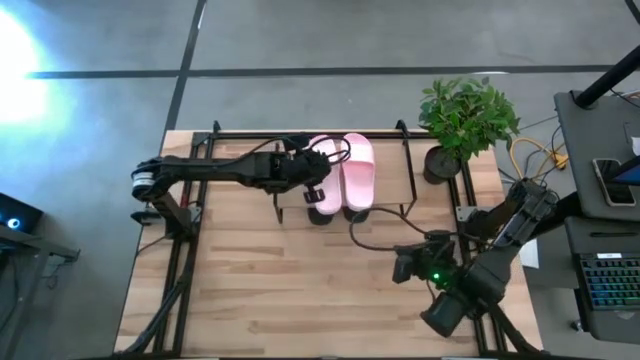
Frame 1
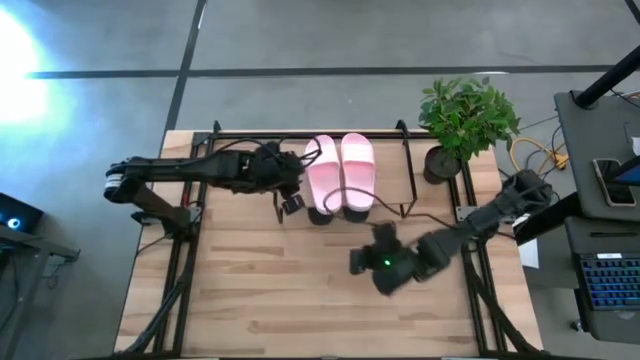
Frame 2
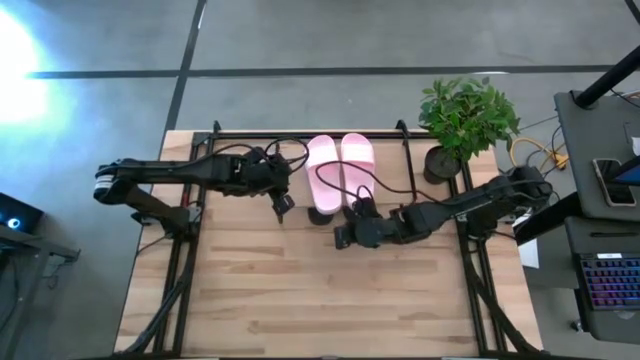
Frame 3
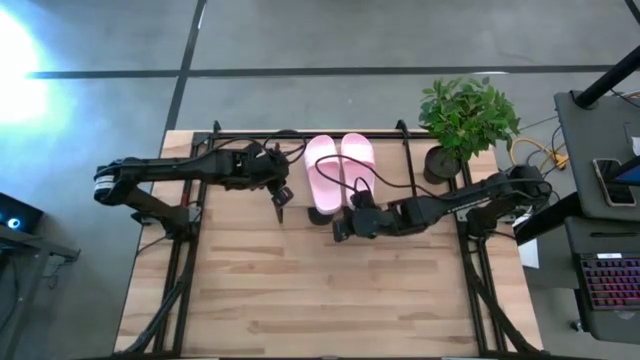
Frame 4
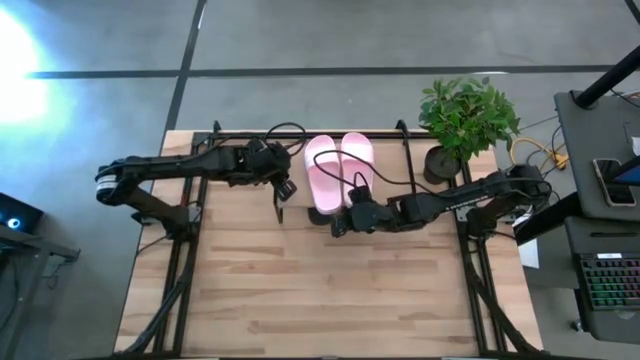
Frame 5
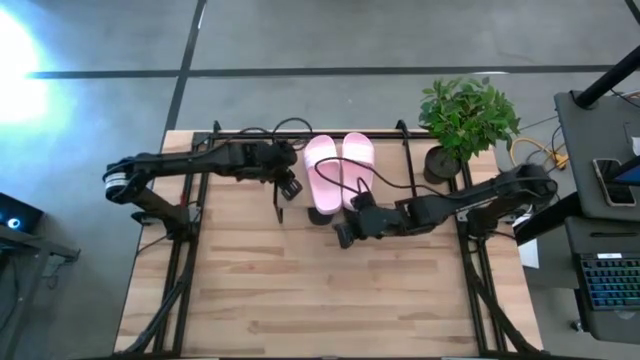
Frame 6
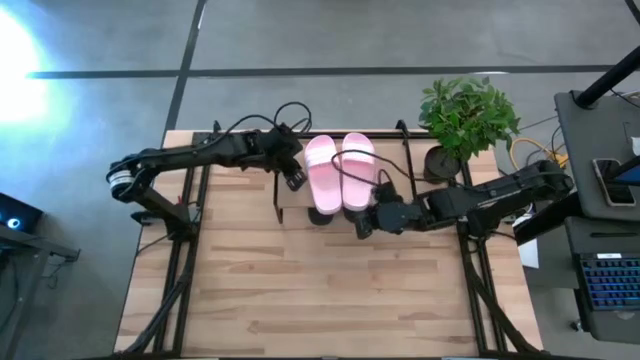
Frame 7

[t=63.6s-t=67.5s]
Task: Pick and place slides into the shelf
Adjust the pink slides on the shelf

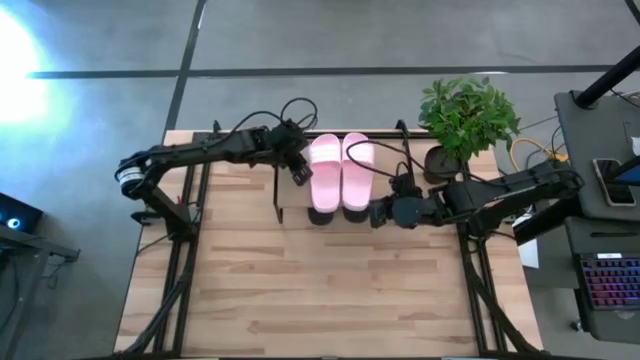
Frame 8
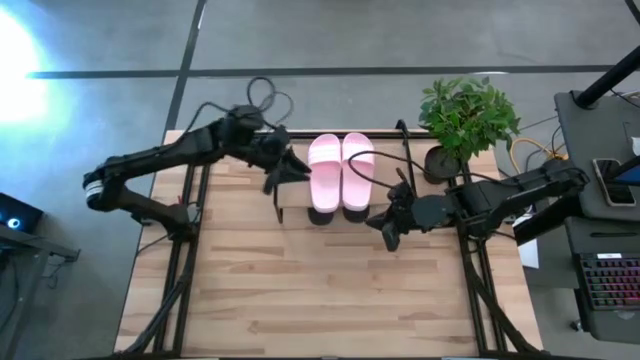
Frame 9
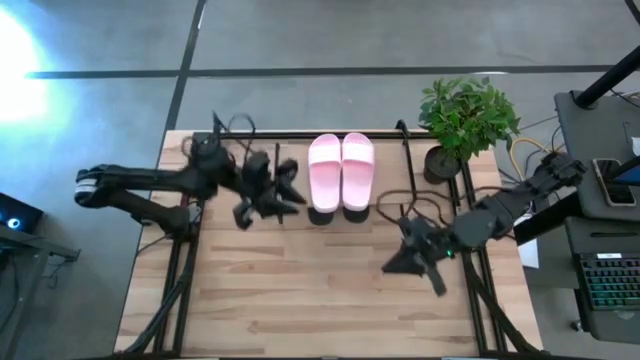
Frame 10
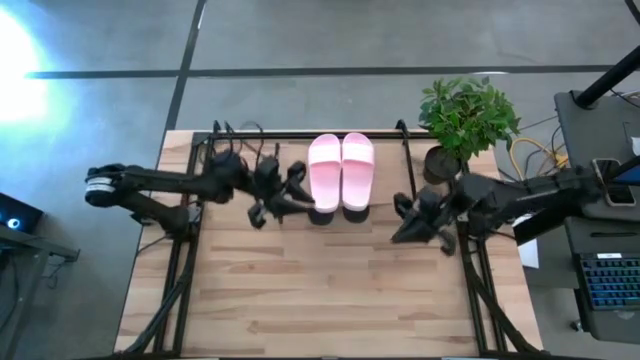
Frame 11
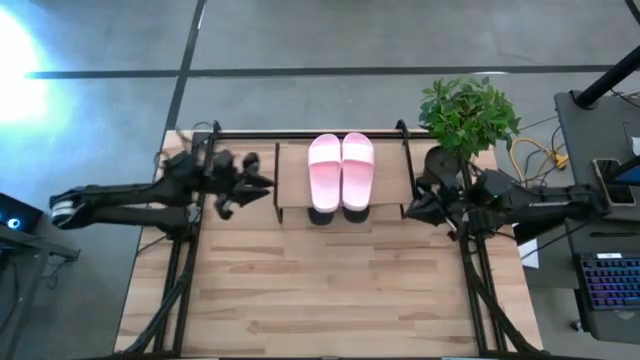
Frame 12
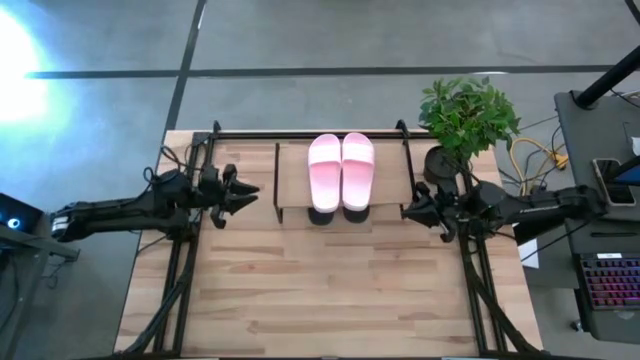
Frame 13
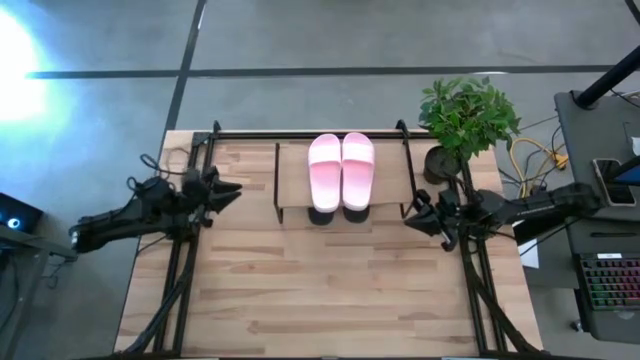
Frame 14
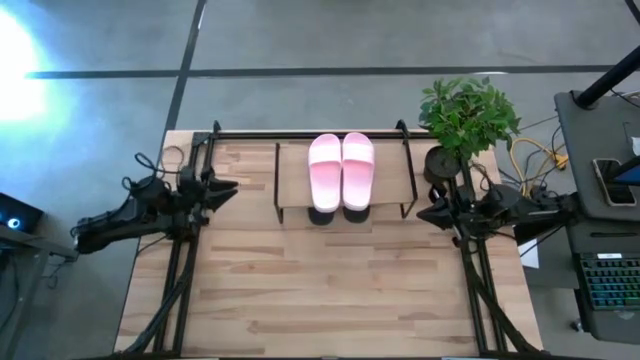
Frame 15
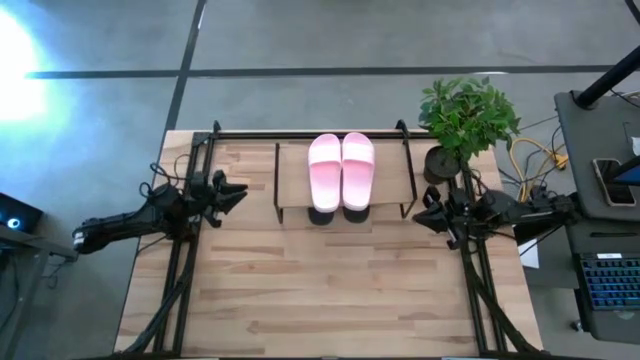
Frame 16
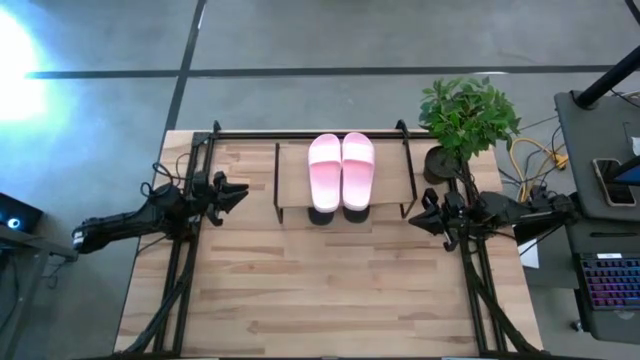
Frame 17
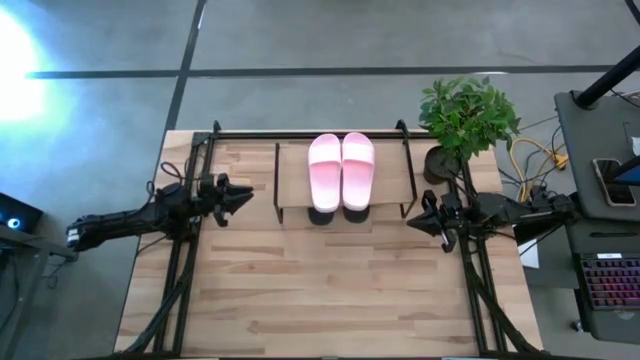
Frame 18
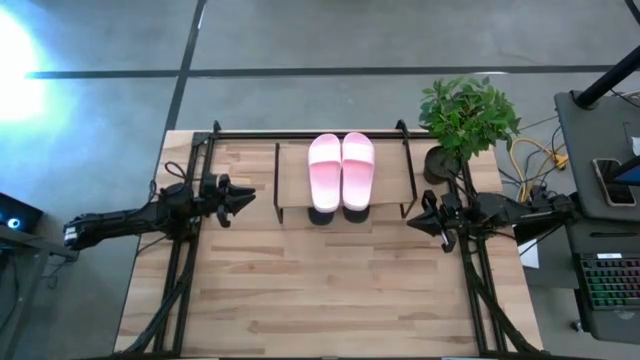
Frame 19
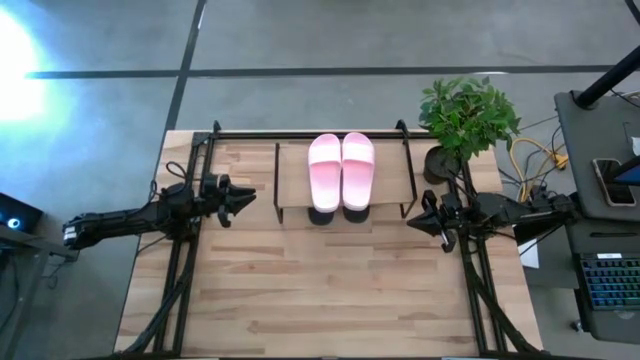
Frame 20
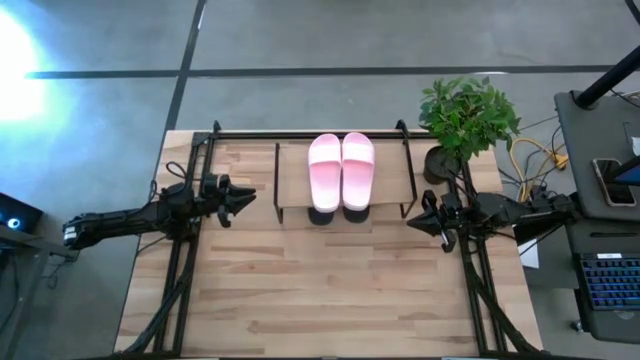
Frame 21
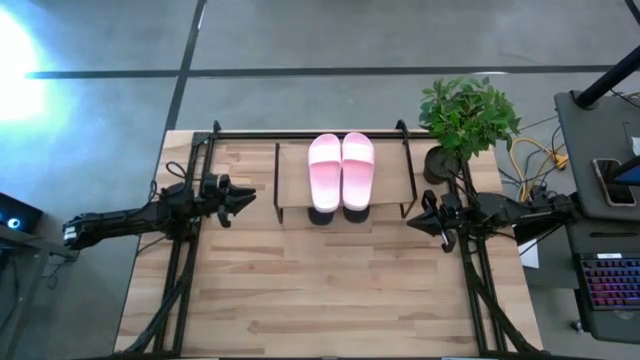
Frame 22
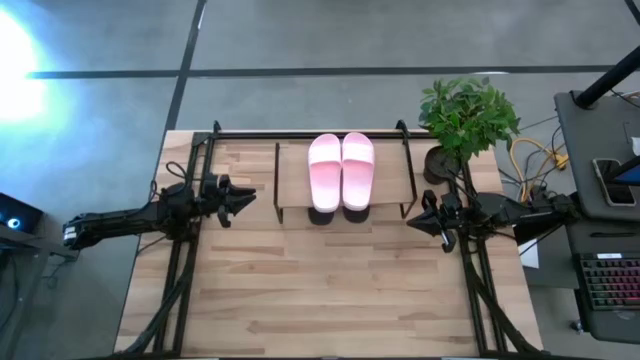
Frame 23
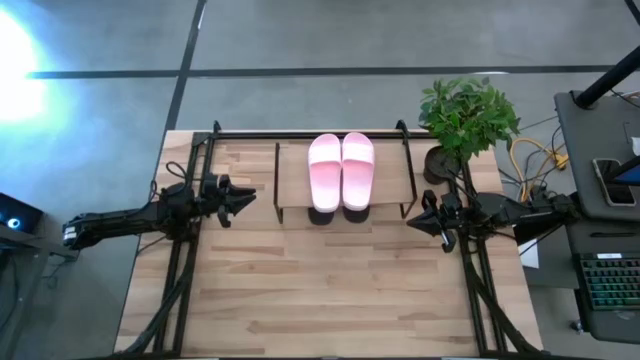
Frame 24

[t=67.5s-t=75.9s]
Return to Home Position

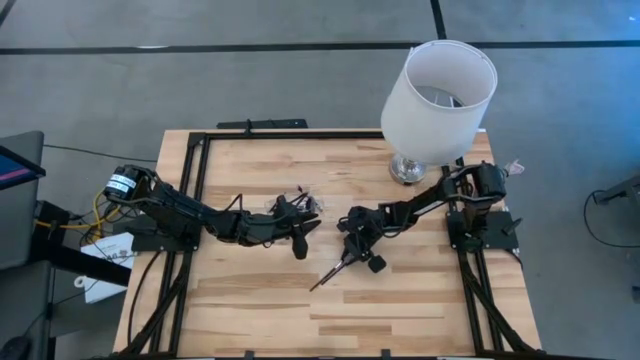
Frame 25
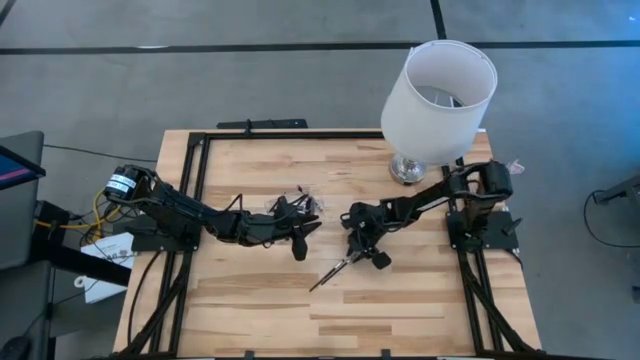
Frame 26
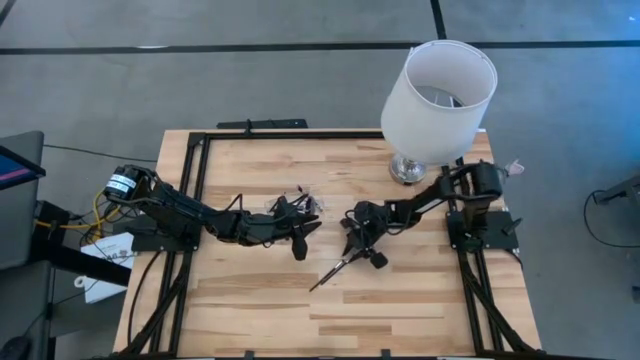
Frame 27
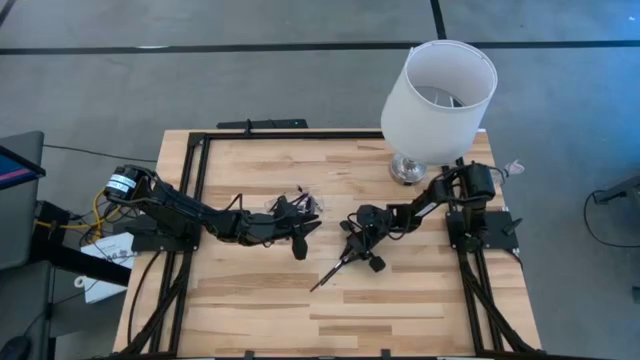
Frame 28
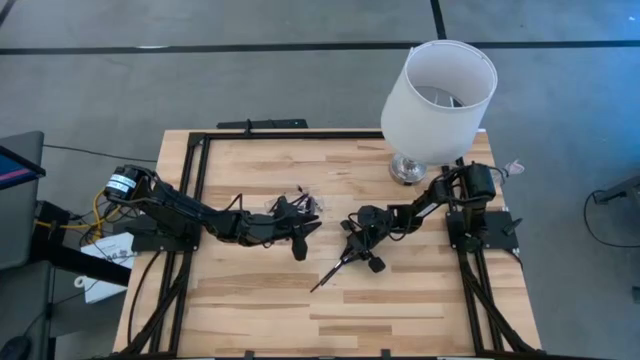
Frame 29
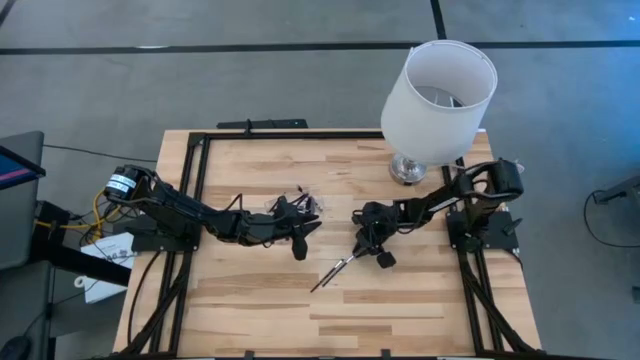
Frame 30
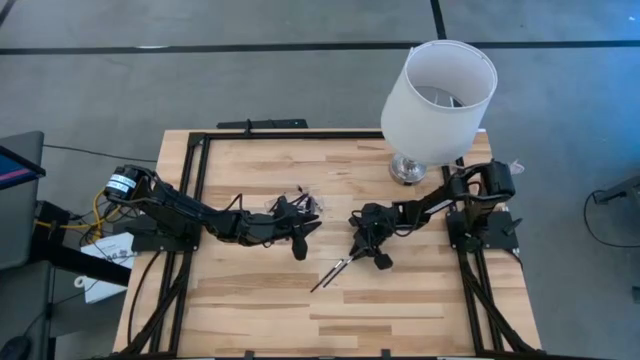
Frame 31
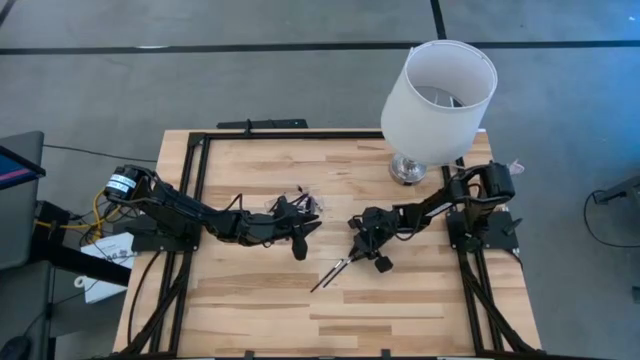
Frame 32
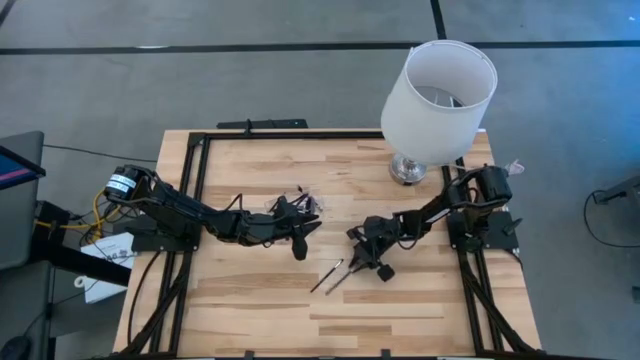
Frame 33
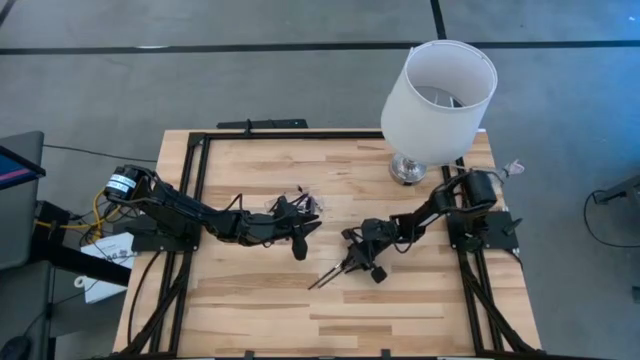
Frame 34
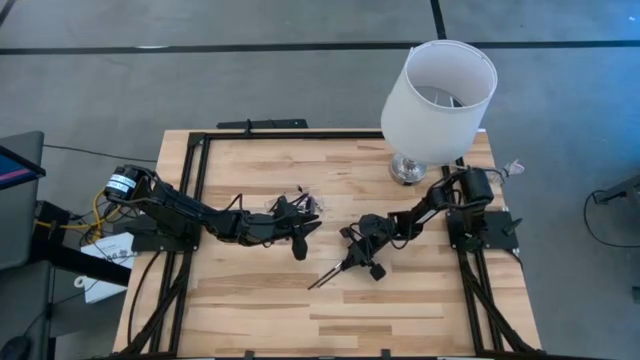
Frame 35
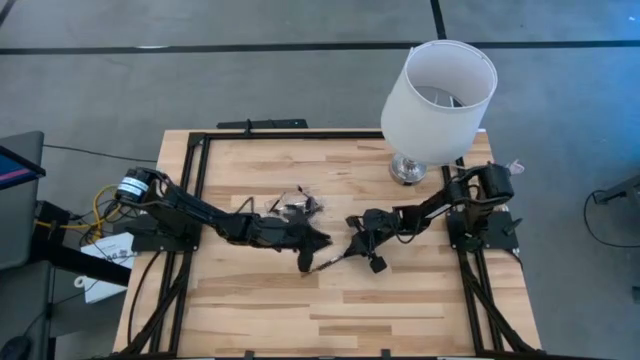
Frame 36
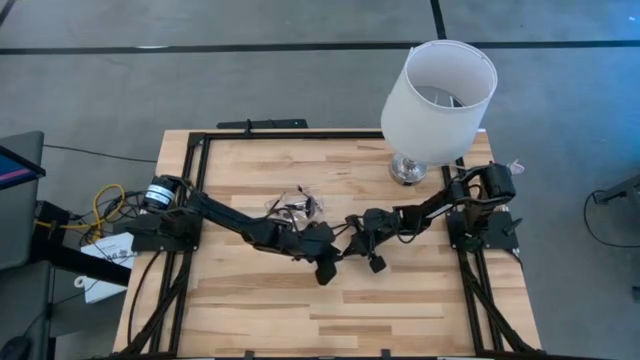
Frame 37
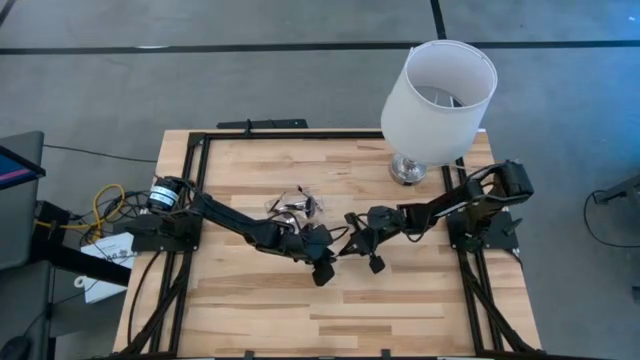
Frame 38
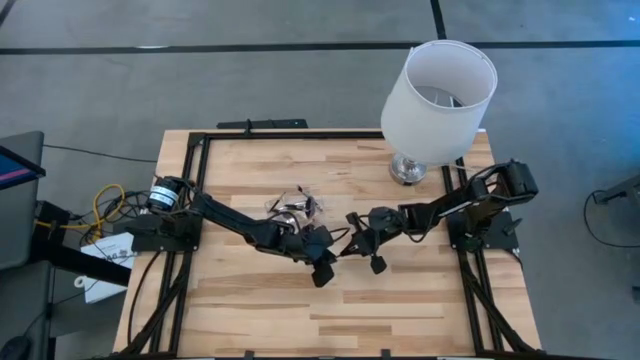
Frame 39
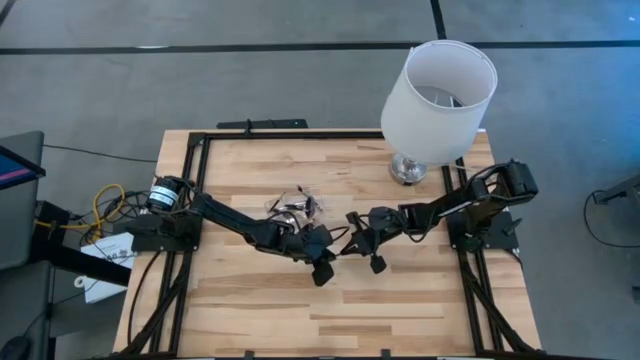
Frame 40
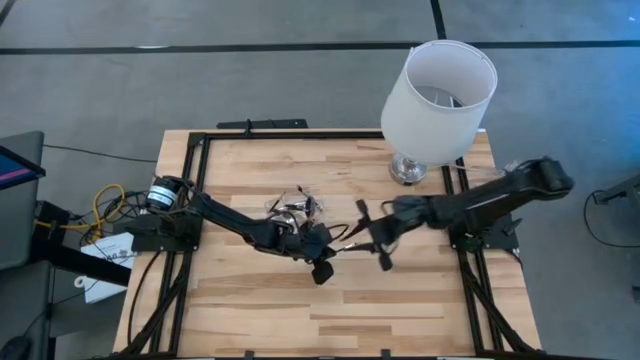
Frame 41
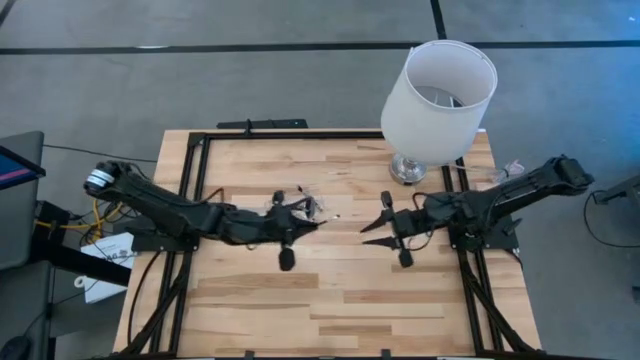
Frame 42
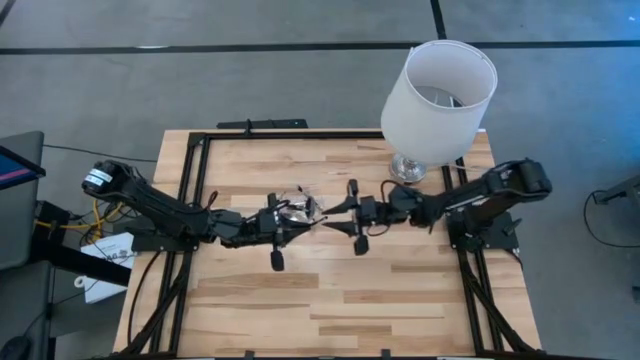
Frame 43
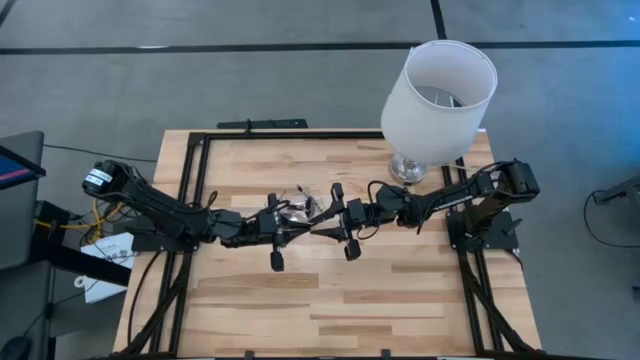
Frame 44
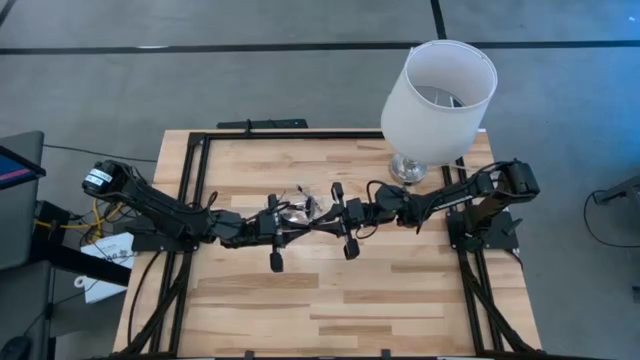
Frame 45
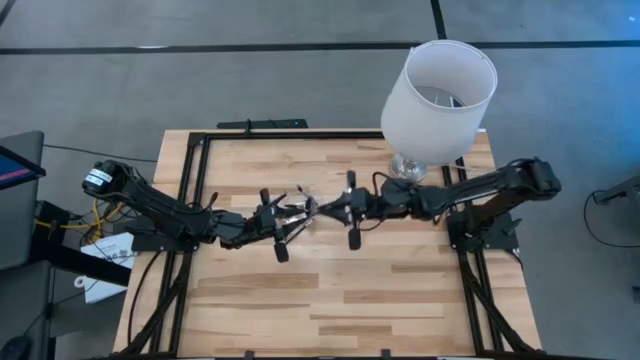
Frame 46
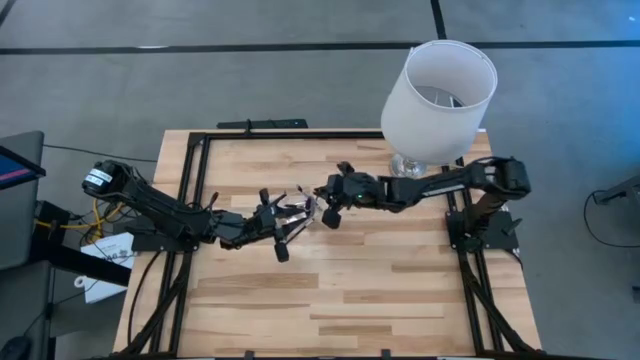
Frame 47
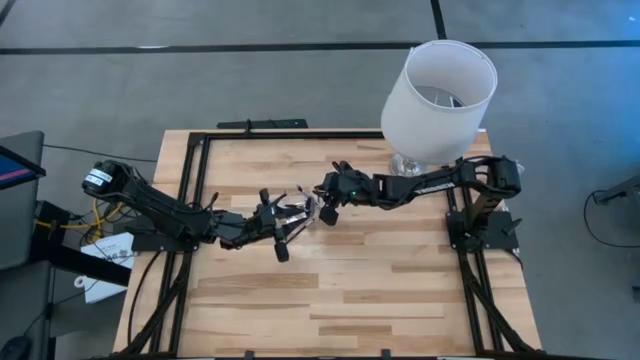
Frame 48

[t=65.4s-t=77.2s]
Task: Pick & Place Makeup Supplies
Put the black makeup brush into the transparent organizer
